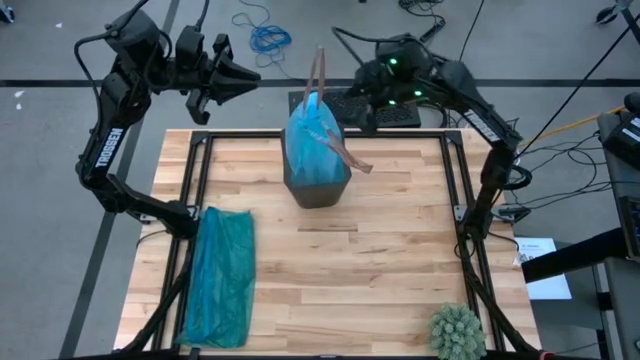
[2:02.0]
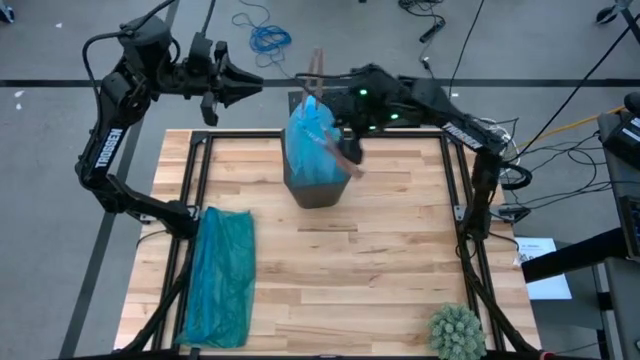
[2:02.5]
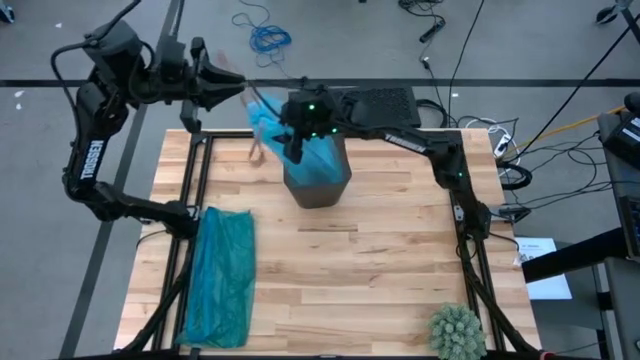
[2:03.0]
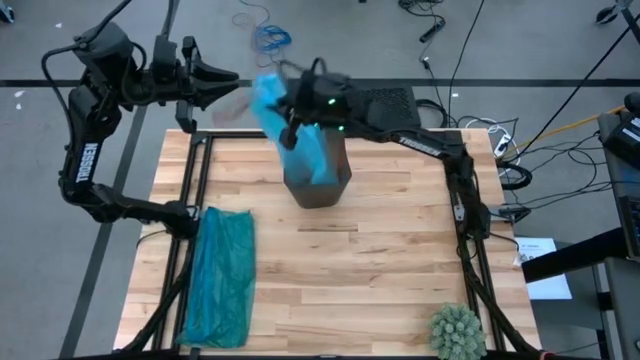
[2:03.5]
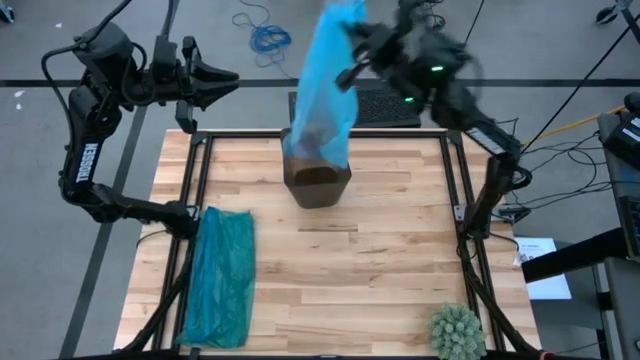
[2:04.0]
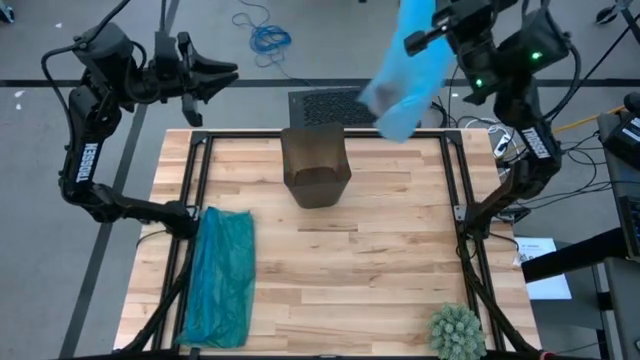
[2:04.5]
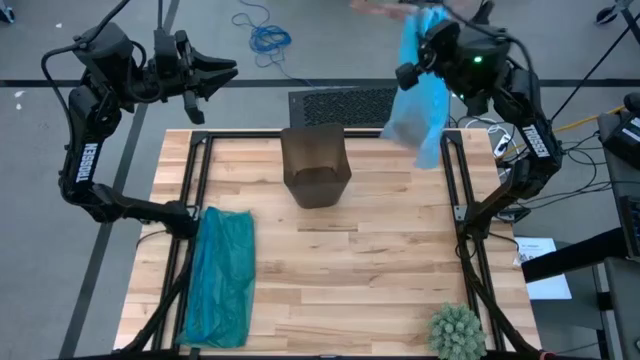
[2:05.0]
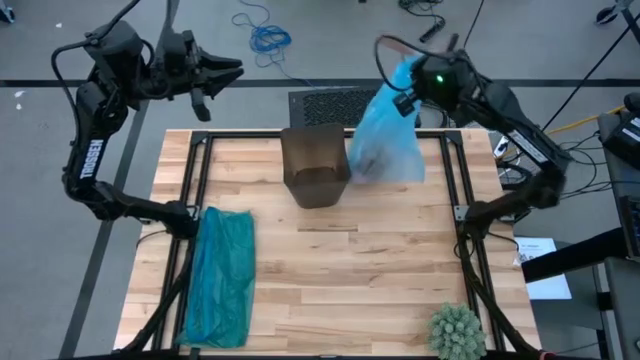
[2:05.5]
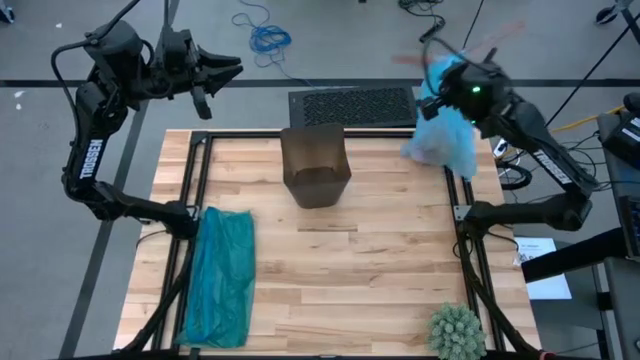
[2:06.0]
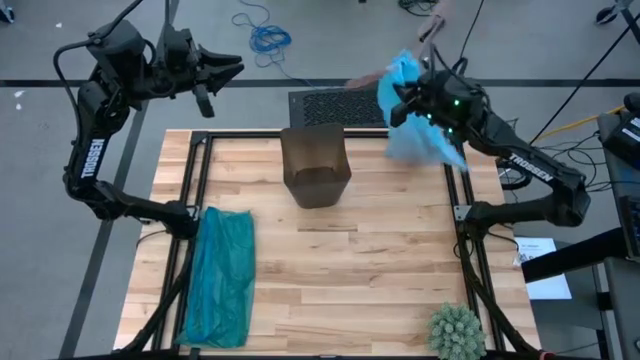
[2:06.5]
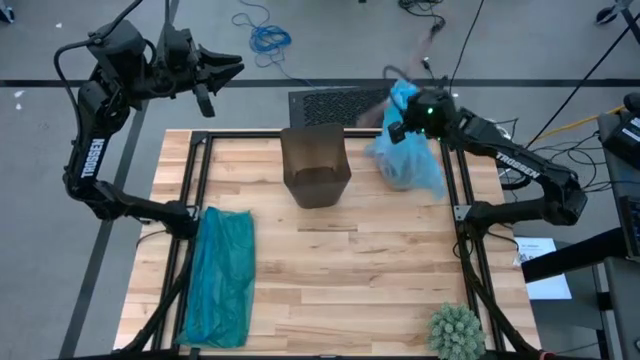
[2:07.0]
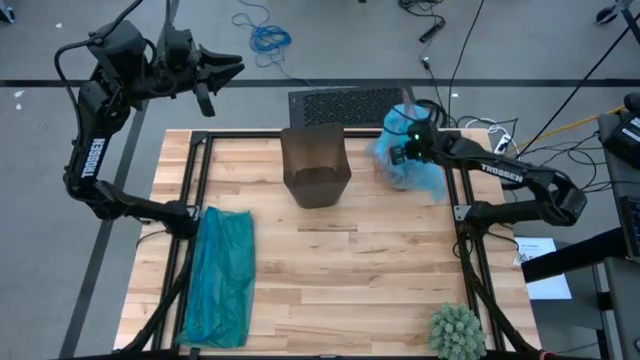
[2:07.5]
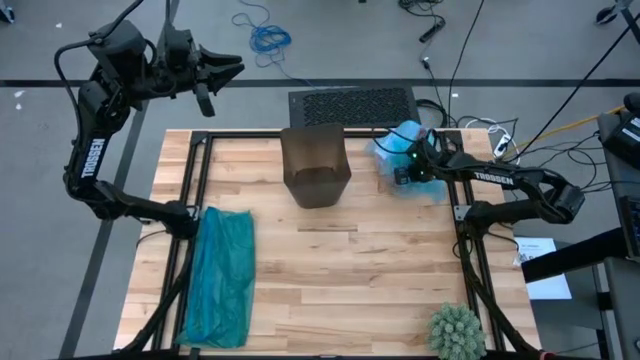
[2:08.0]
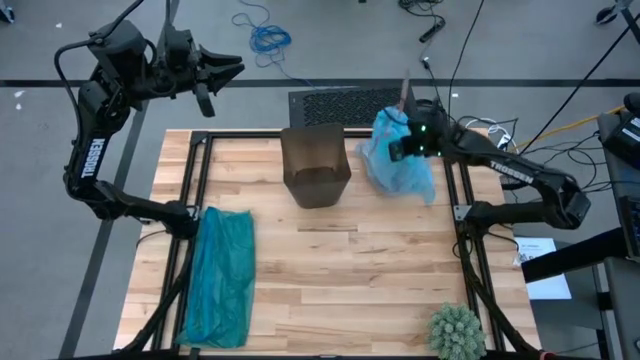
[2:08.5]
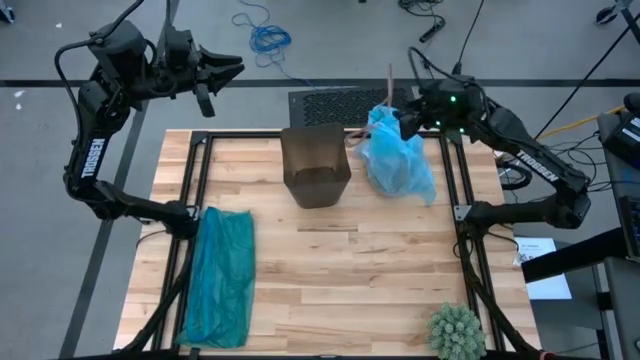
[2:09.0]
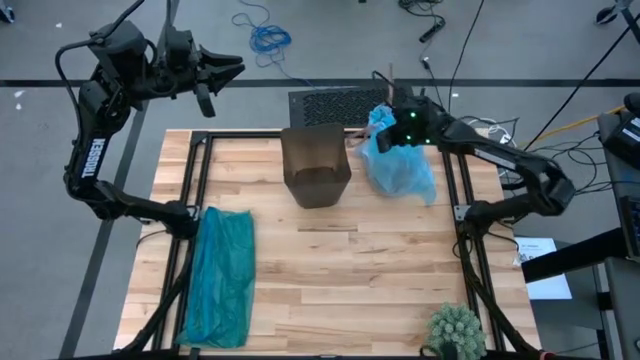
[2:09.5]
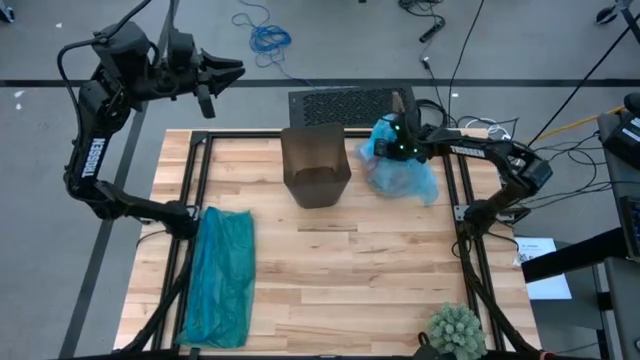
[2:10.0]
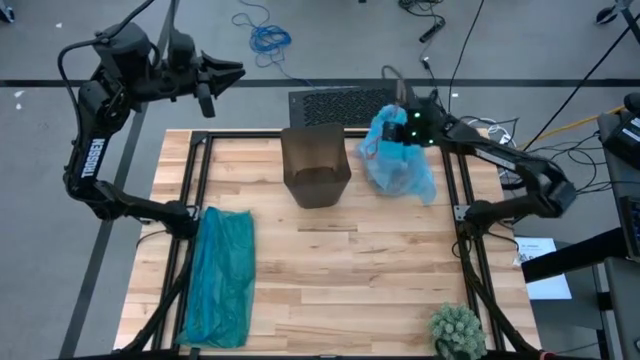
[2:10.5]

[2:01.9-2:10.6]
Task: place trash/remove bag and relplace
Remove the trash bag from the trash bin

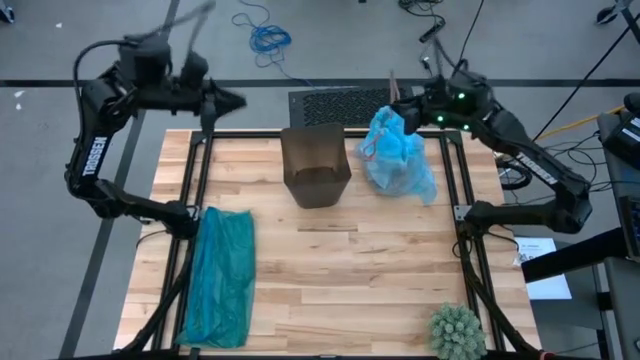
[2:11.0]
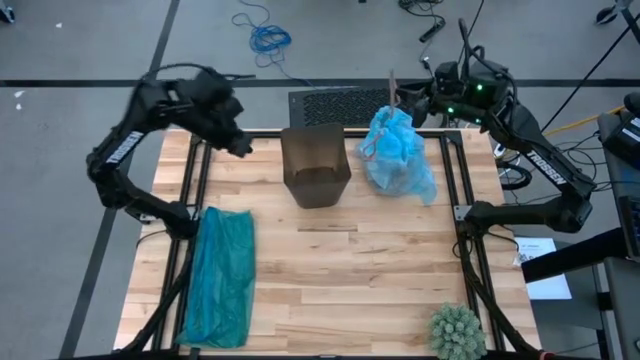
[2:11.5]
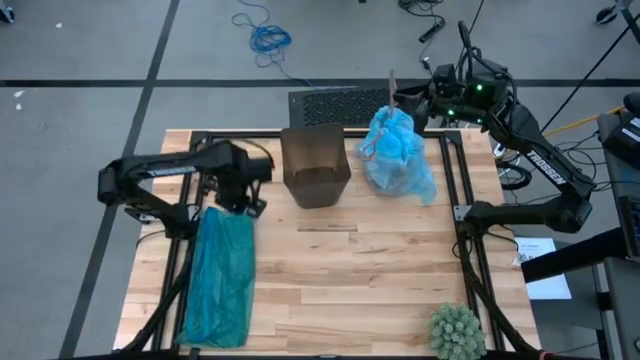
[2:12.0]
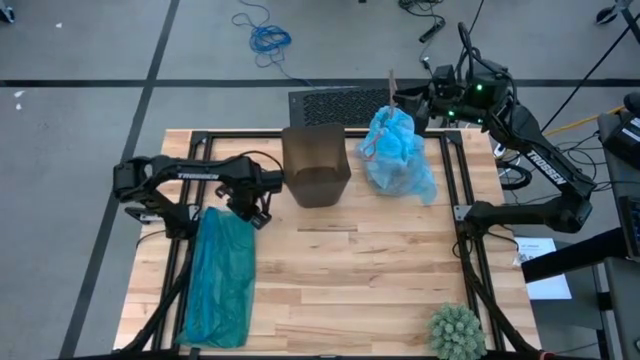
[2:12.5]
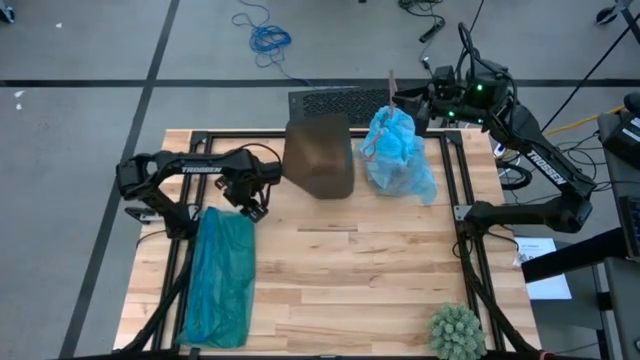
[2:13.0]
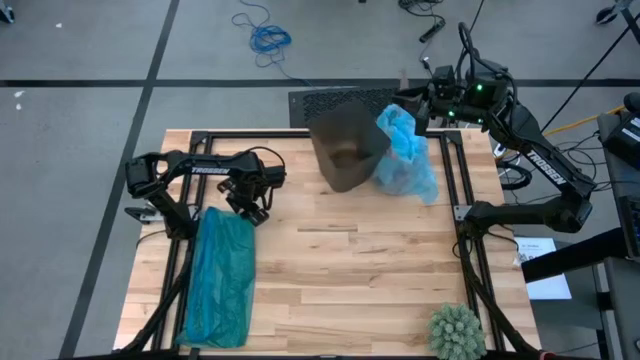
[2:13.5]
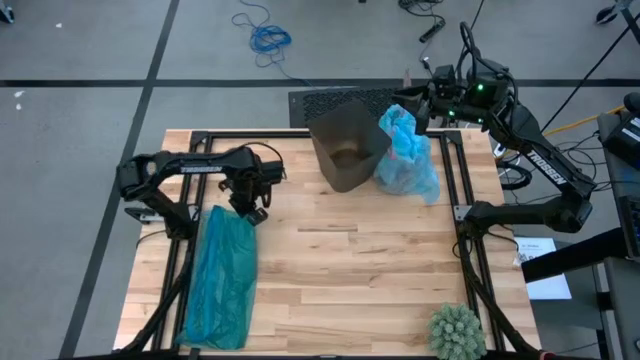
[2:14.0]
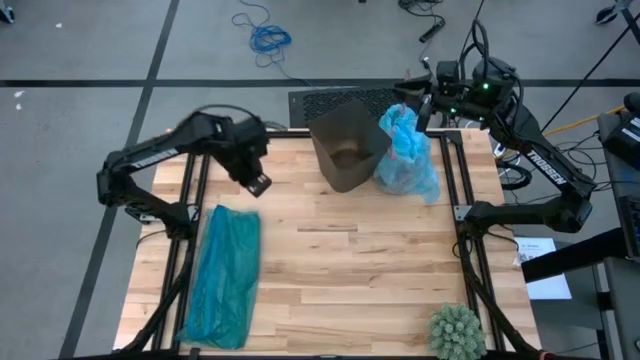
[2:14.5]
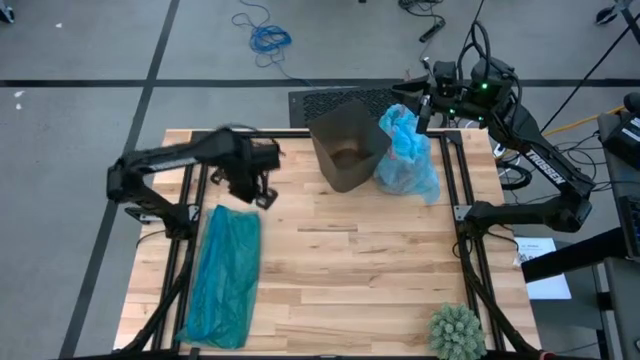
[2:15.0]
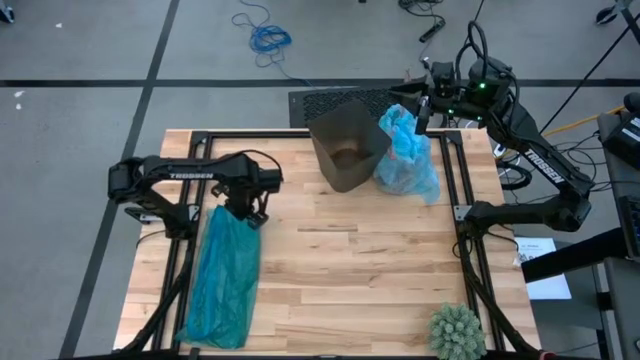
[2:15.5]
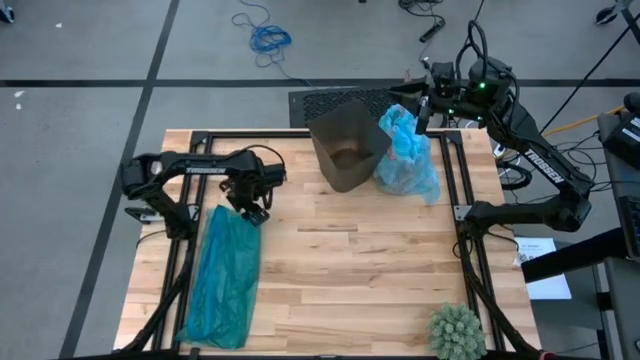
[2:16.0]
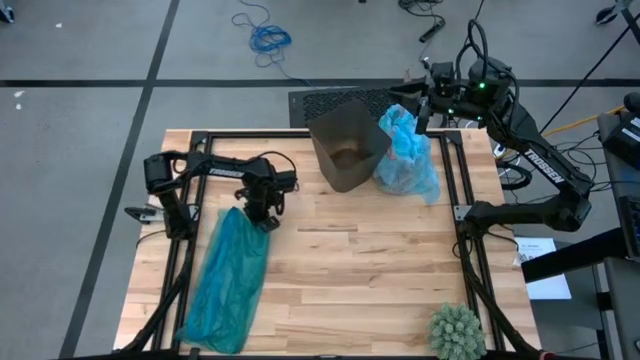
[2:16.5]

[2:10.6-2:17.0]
Insert the dark blue trash bag into the trash bin

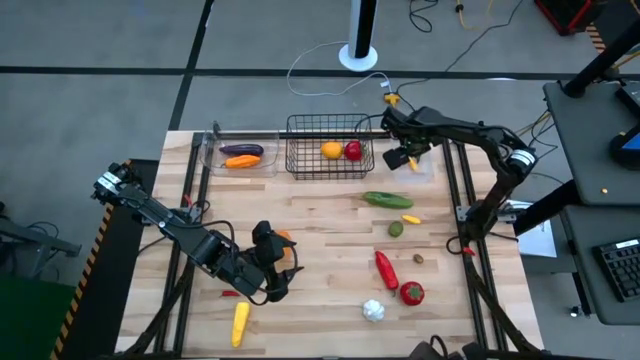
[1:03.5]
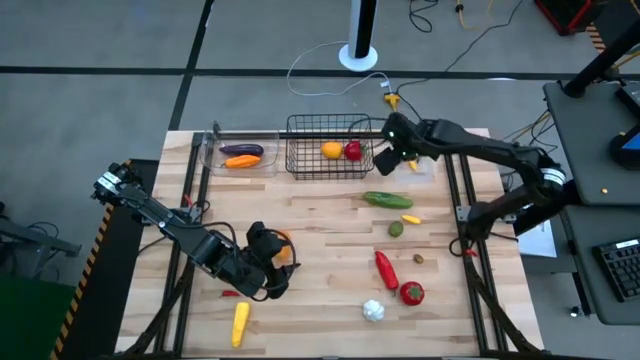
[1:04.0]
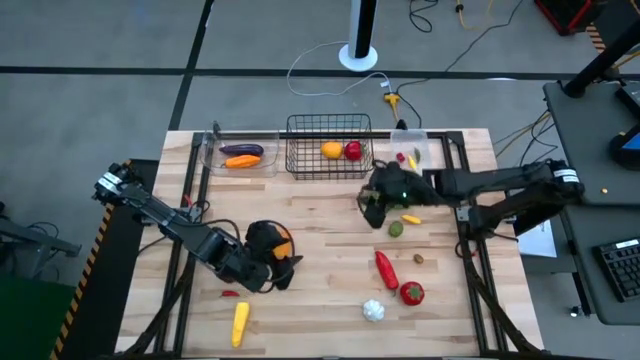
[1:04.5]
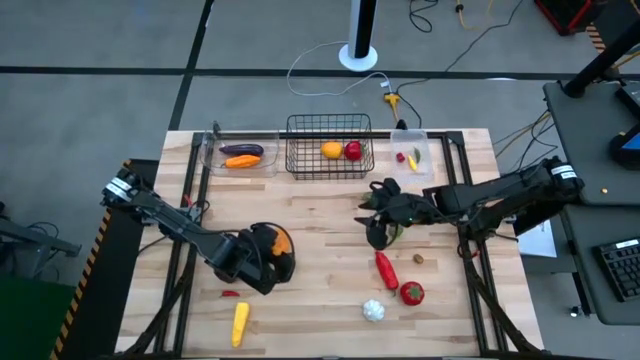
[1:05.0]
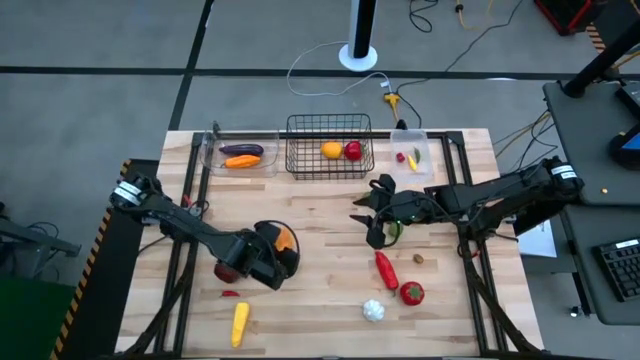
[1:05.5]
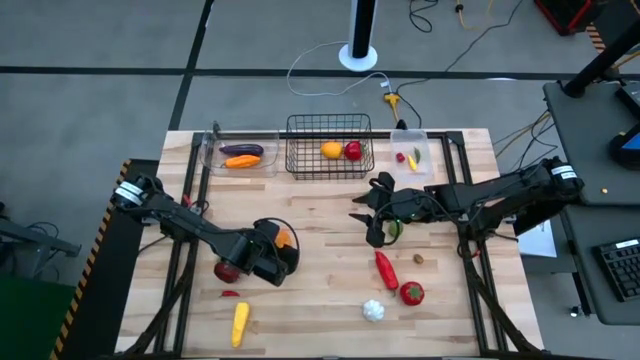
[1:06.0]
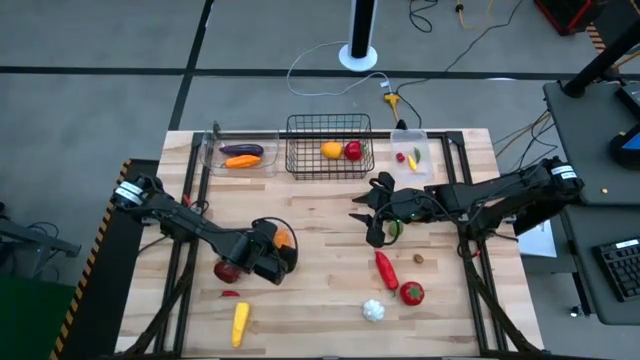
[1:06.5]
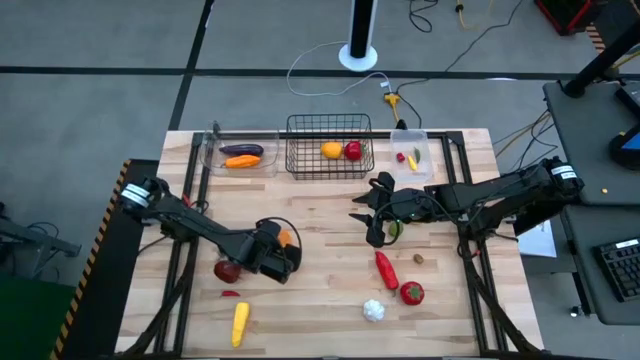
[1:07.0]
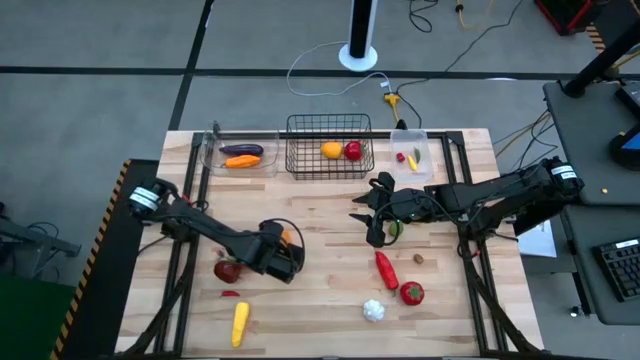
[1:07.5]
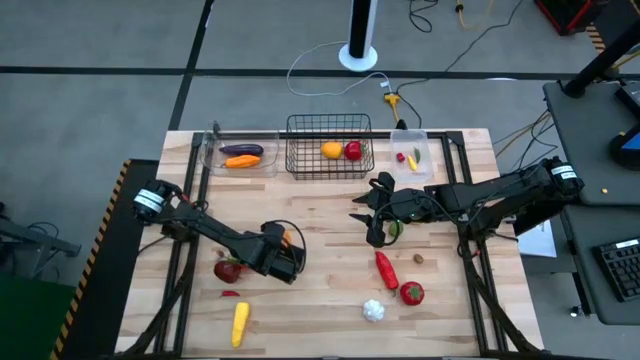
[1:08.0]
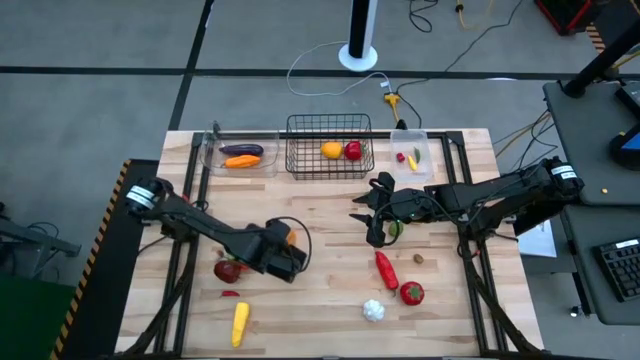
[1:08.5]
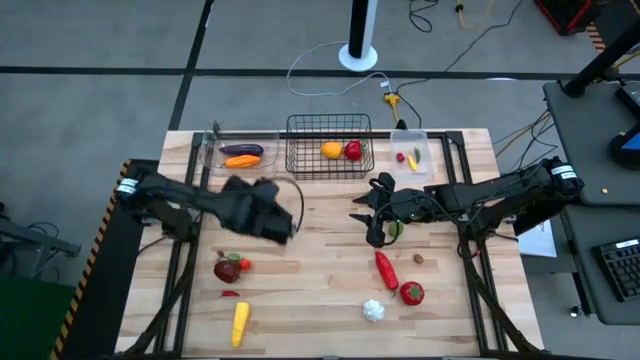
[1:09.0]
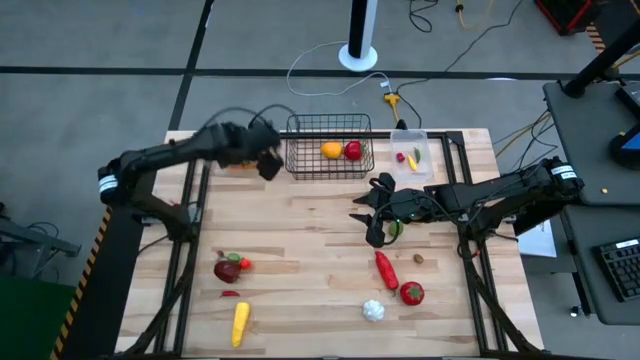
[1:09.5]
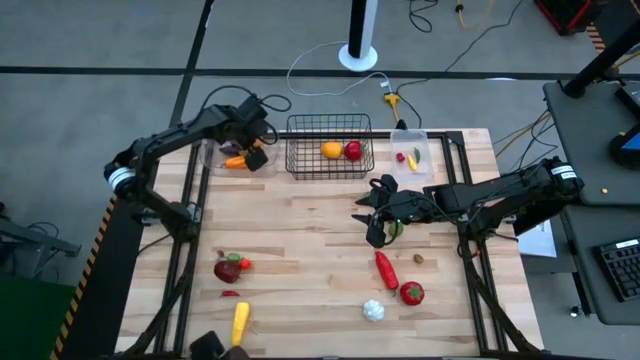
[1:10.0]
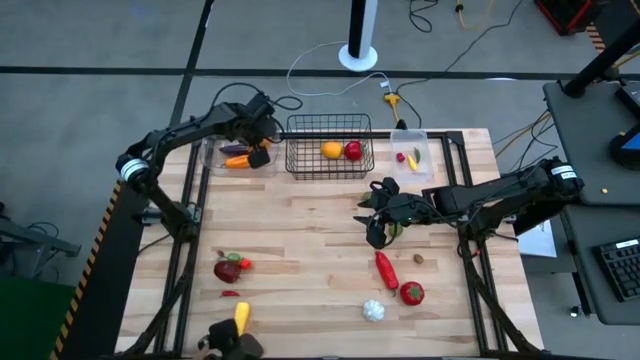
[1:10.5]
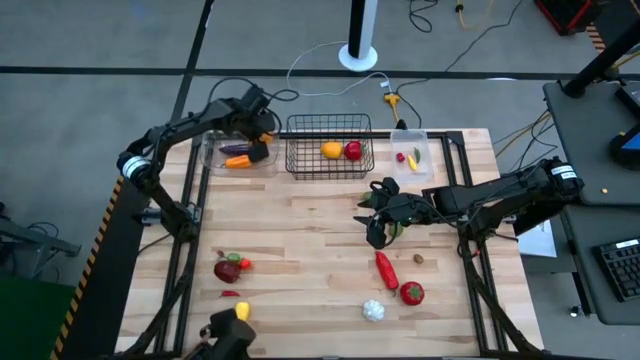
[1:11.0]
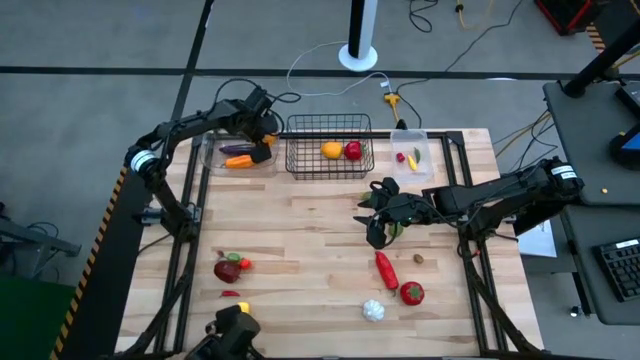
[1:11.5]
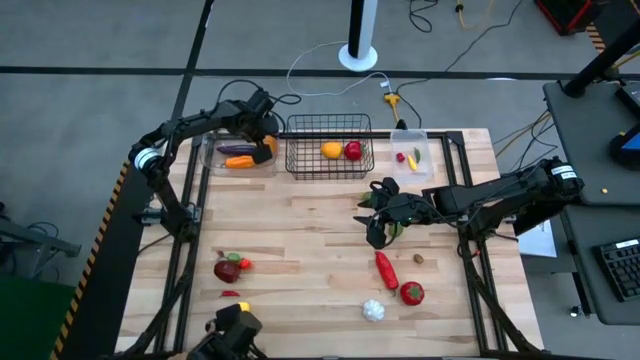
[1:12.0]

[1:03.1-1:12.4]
Task: Sort produce into baskets
Put the potato into the clear bin
